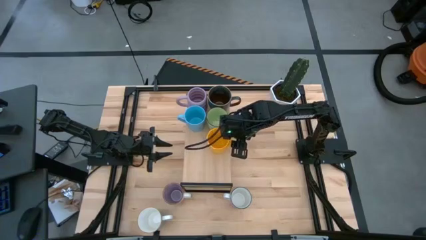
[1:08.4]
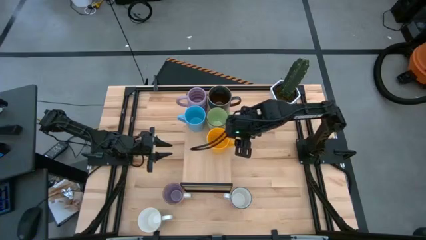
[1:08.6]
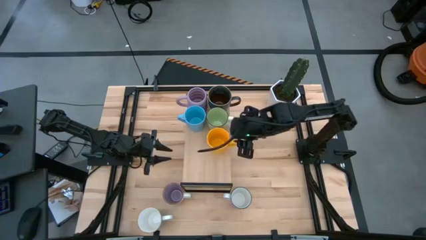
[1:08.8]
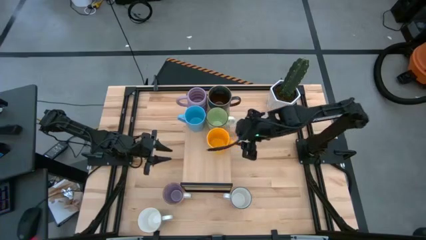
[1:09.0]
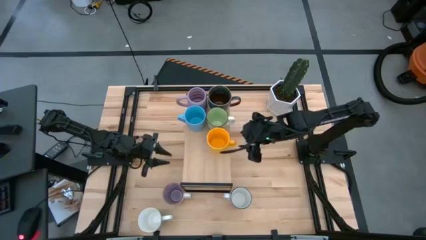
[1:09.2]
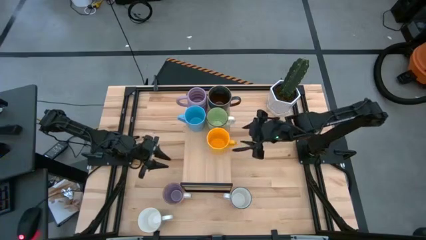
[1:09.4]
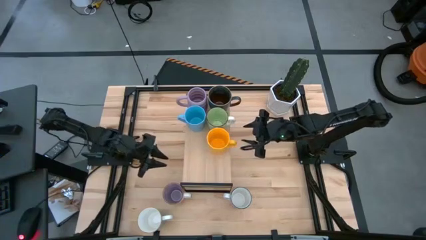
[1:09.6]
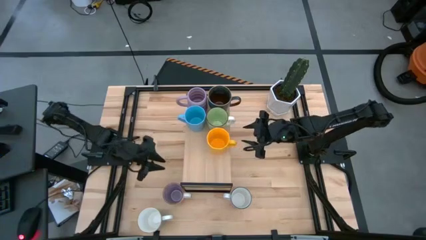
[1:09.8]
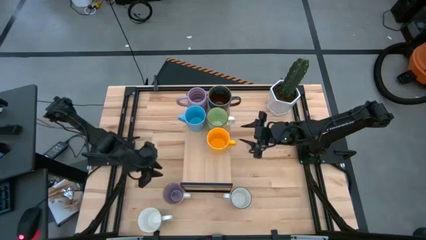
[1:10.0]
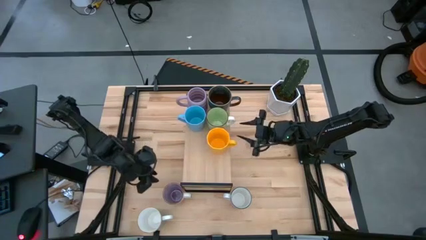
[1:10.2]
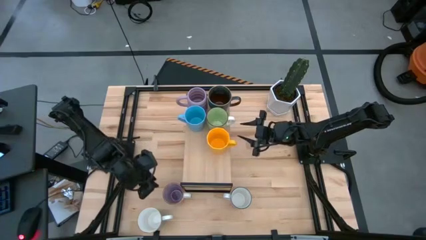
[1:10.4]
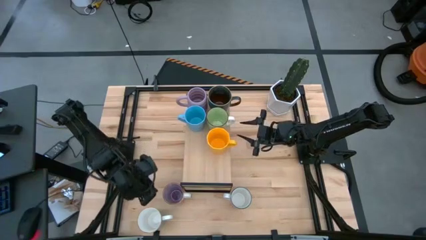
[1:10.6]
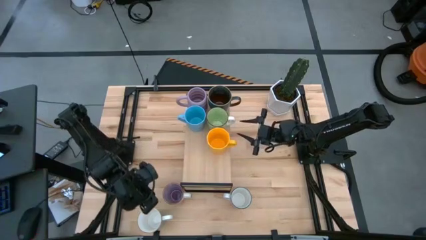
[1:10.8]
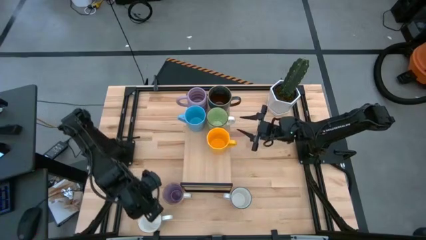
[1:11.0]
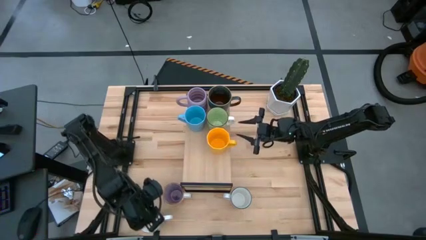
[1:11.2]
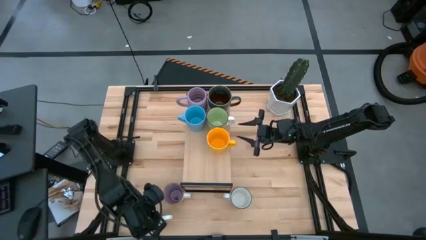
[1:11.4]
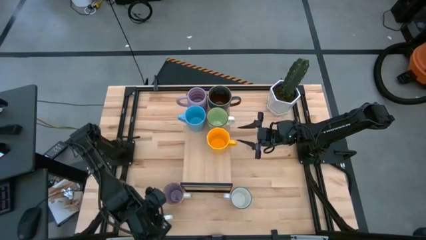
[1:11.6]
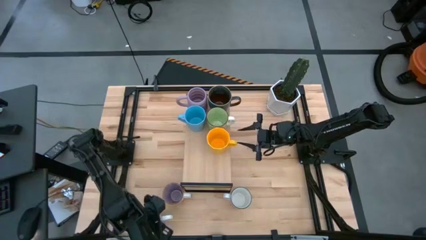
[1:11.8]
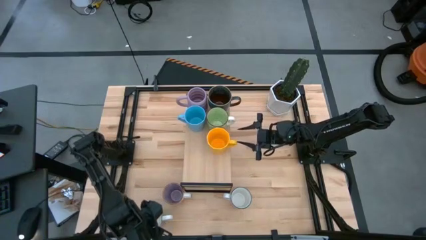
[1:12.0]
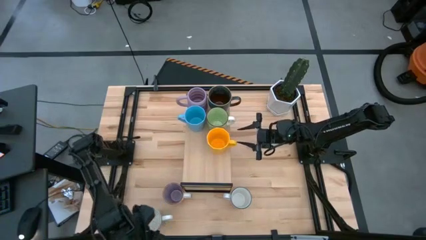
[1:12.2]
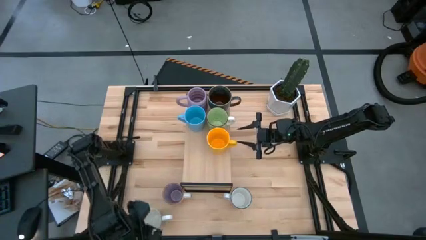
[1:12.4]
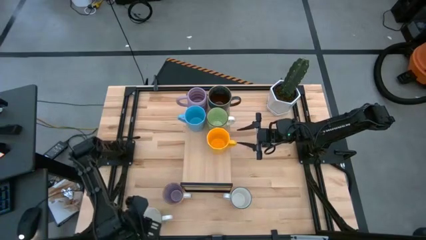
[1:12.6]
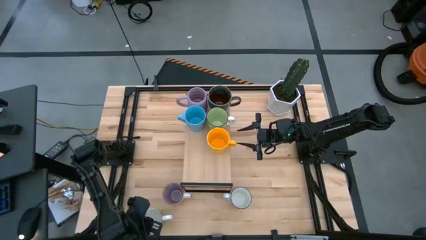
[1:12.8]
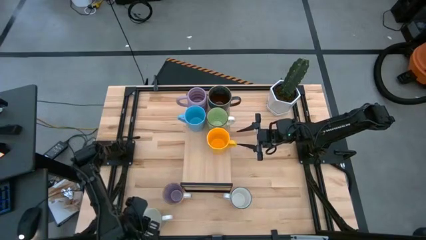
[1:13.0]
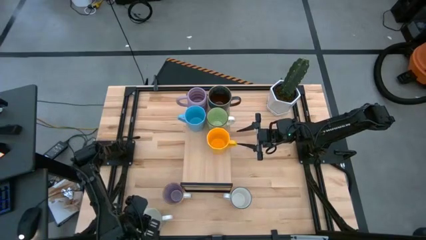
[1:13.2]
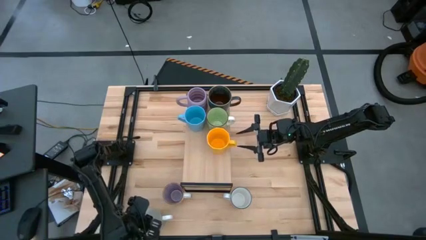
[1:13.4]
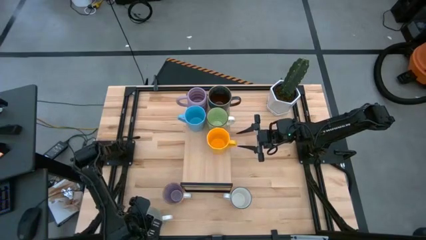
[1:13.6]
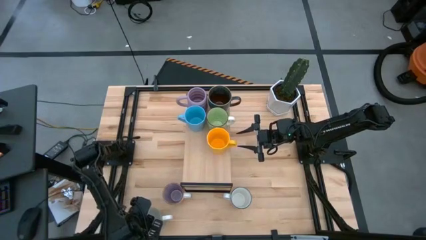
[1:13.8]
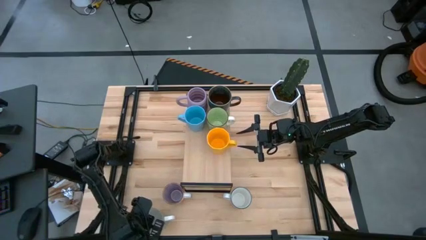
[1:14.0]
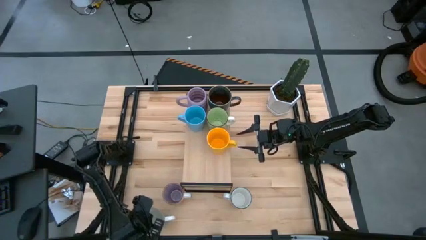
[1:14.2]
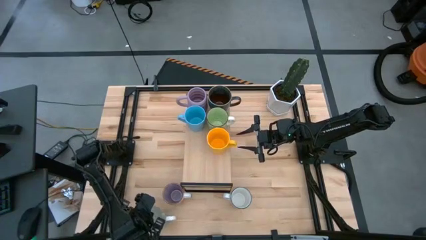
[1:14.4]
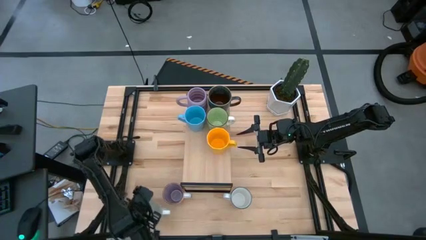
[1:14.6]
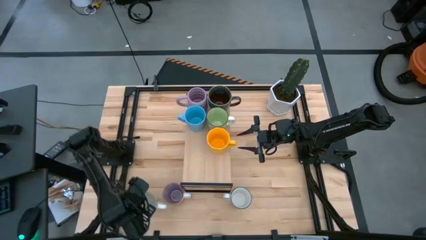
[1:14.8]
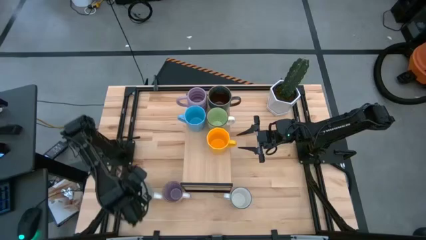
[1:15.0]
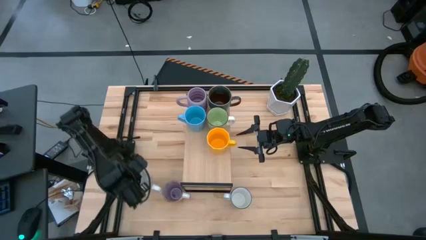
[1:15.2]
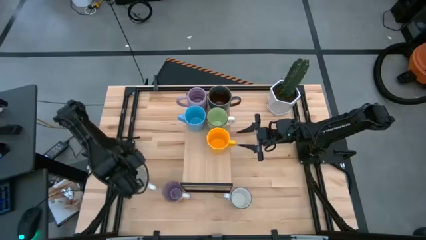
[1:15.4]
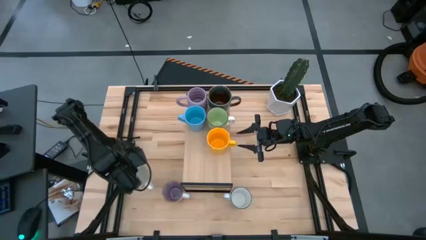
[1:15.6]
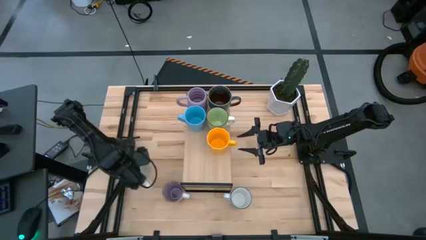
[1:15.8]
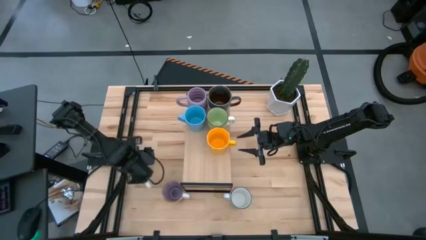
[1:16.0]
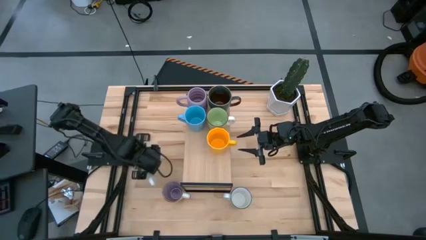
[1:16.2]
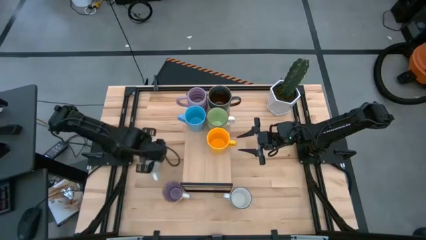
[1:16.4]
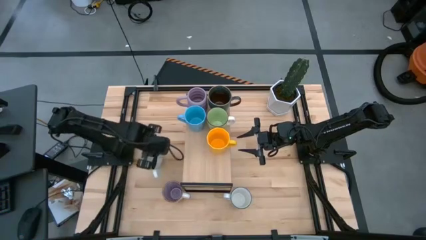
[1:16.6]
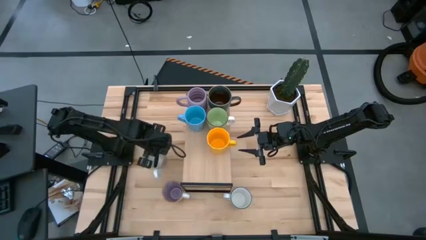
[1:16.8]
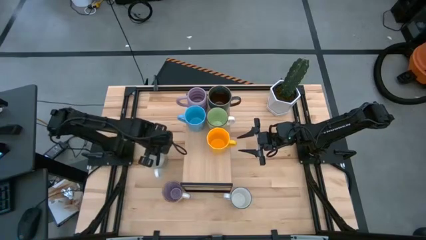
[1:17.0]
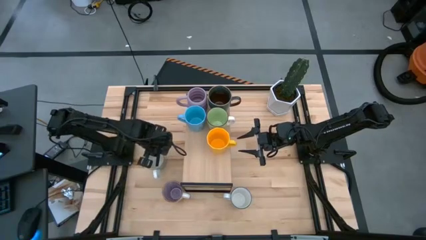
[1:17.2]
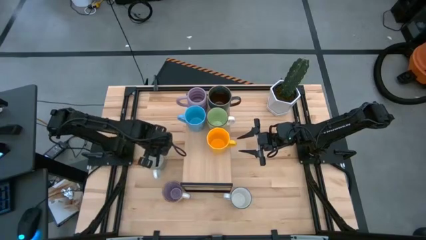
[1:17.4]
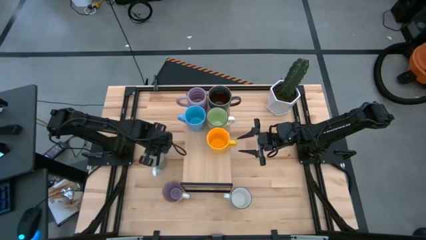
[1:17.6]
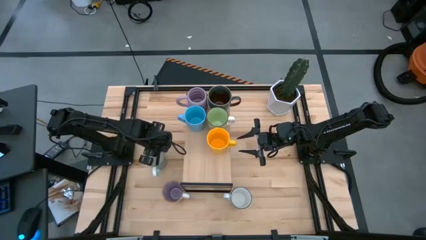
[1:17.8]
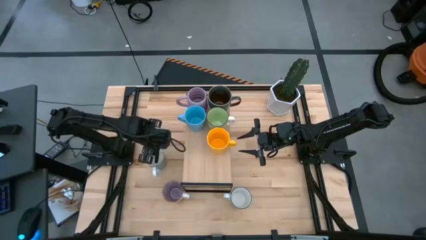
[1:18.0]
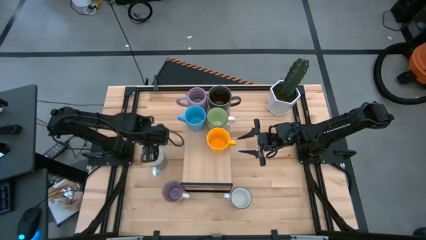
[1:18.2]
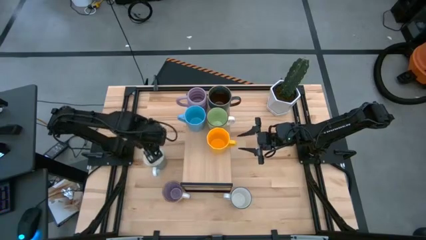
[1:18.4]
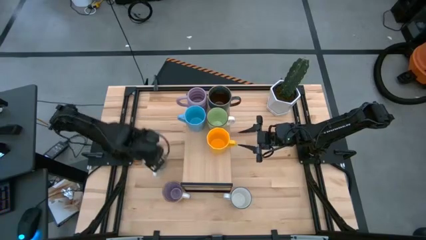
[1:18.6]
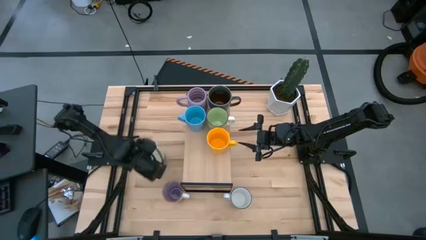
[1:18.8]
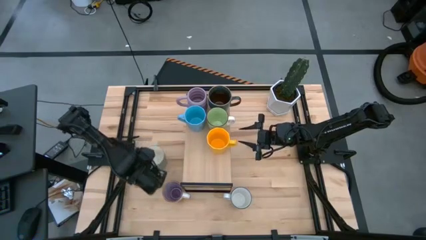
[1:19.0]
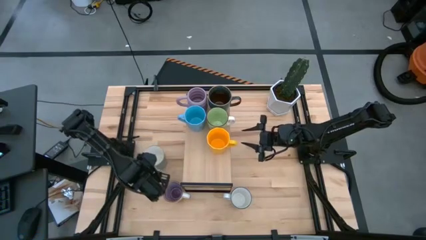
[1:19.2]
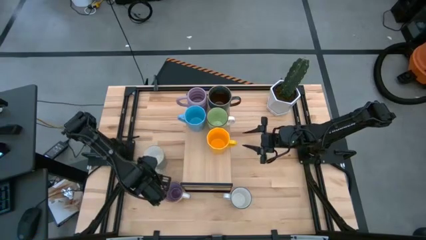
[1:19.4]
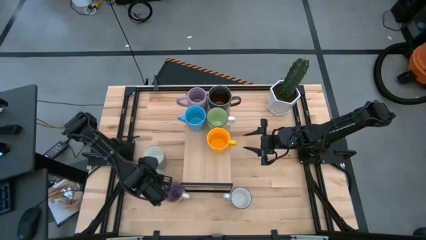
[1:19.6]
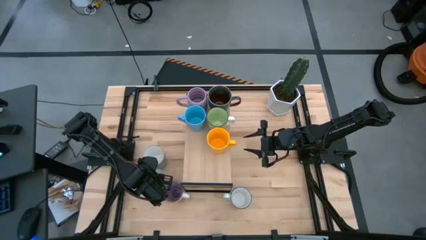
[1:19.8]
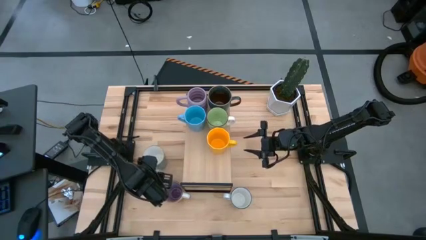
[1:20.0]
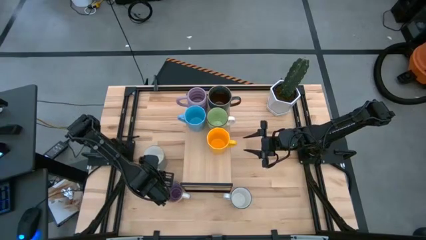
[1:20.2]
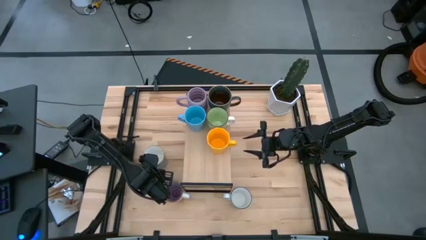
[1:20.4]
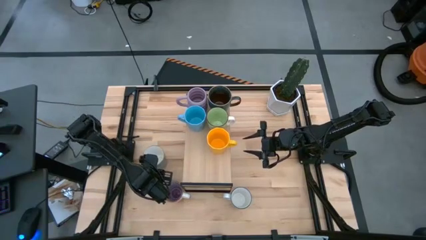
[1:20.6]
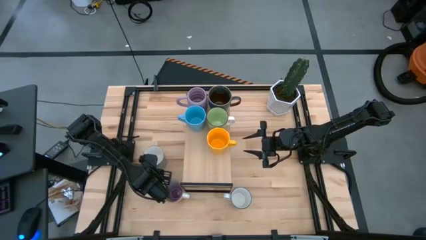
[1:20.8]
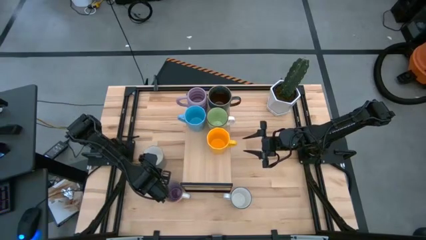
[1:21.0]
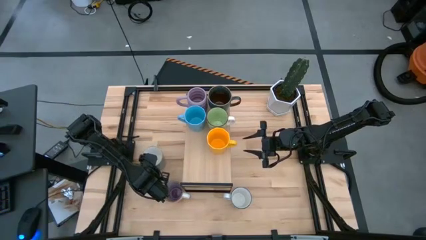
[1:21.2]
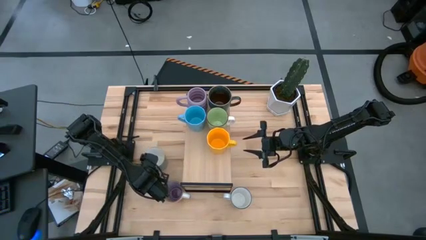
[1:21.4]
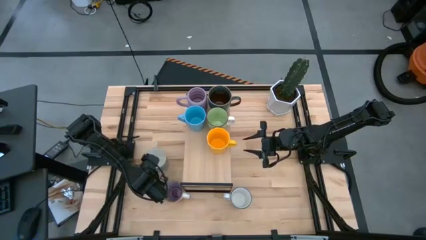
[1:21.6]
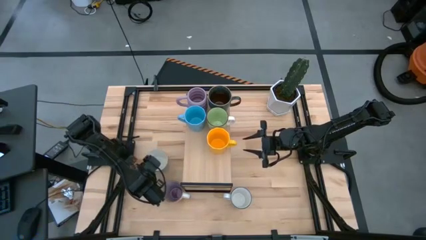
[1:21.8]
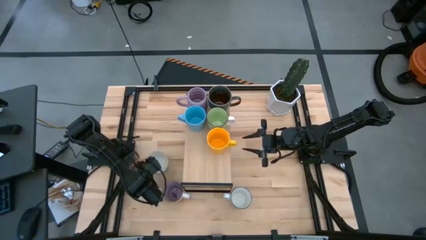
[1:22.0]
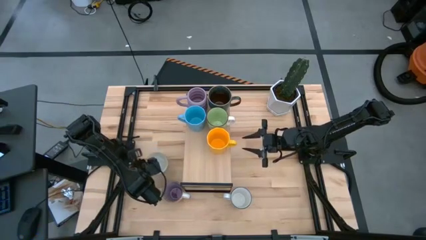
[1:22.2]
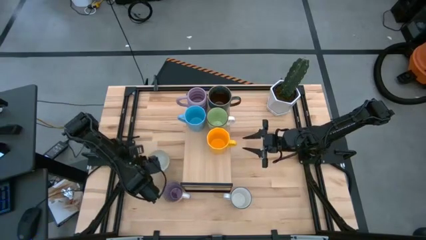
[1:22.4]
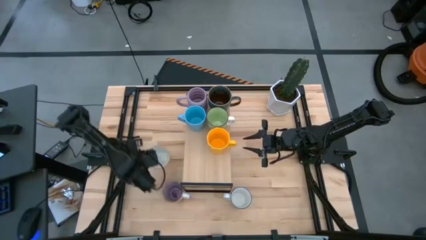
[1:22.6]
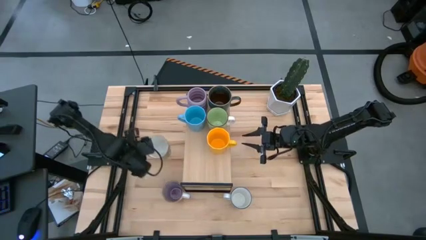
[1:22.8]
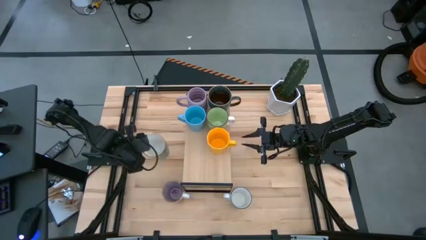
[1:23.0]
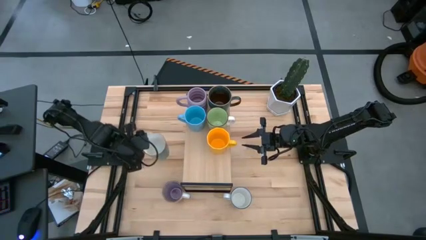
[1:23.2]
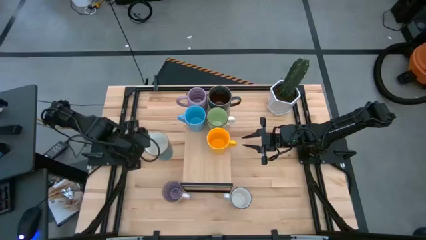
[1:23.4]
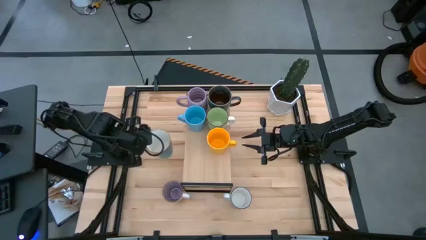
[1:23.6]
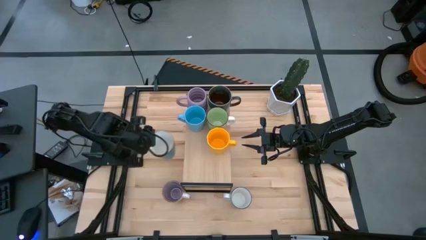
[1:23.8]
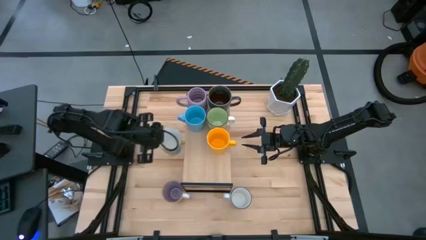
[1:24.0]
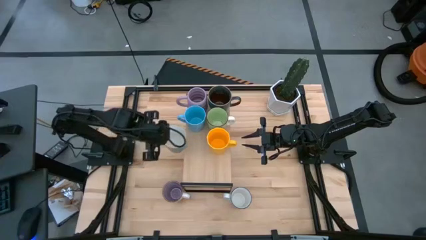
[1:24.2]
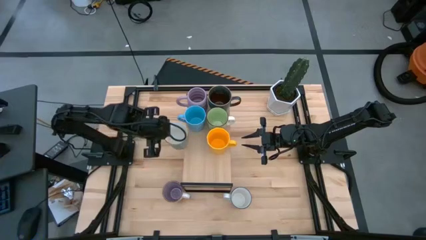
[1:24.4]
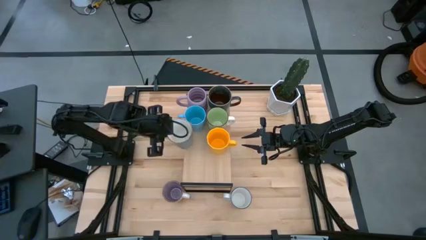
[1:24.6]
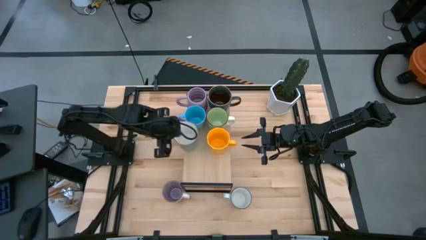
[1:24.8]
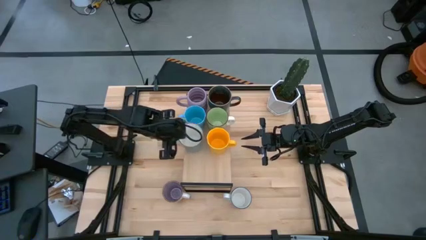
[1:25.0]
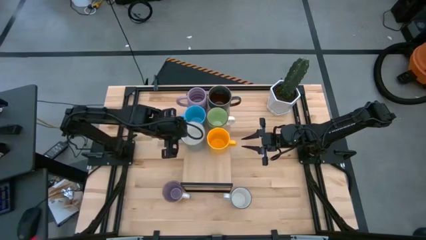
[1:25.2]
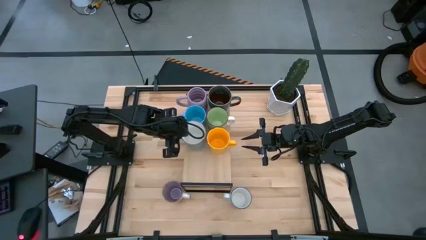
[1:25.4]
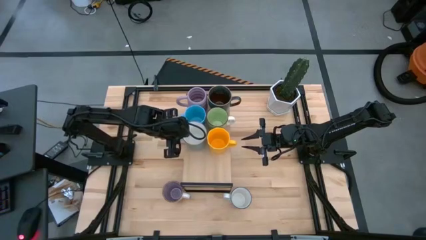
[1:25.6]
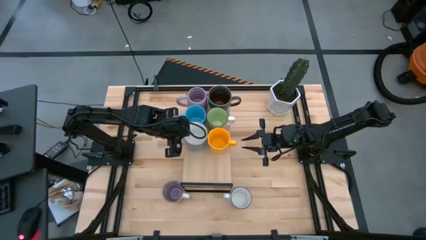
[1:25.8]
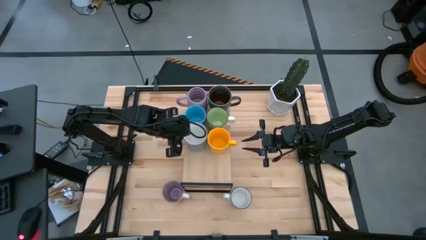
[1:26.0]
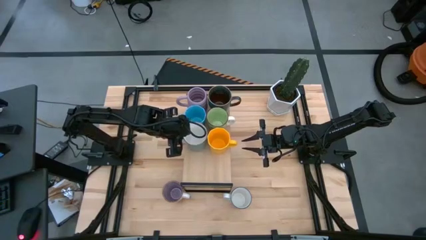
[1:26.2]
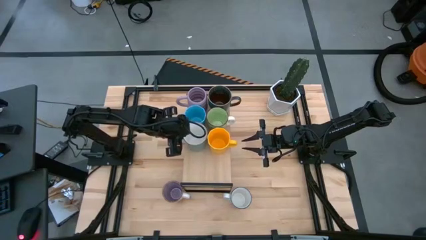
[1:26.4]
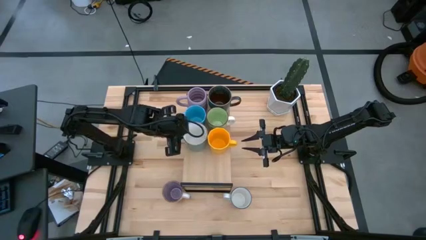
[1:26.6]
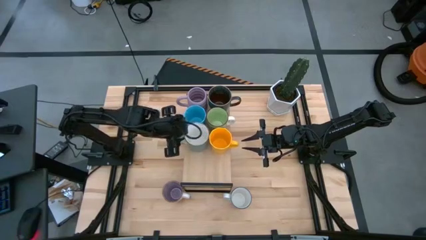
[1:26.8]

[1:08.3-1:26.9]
Task: Place coffee mugs
Put the light blue mug on the shelf
